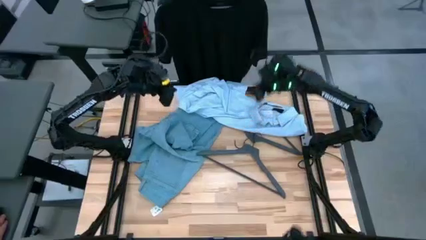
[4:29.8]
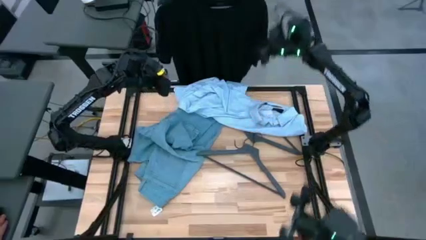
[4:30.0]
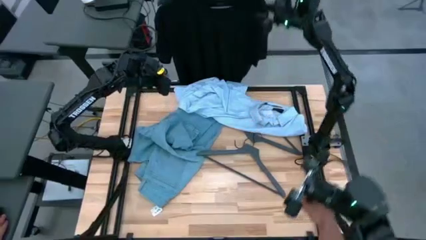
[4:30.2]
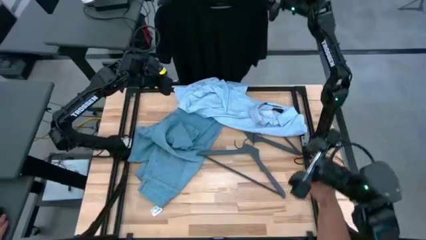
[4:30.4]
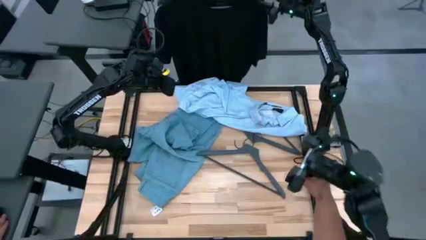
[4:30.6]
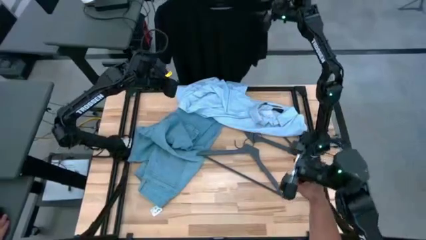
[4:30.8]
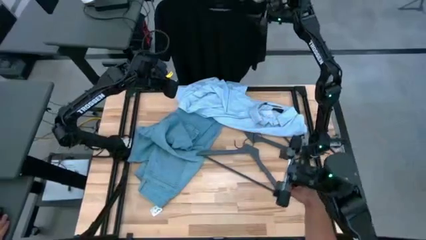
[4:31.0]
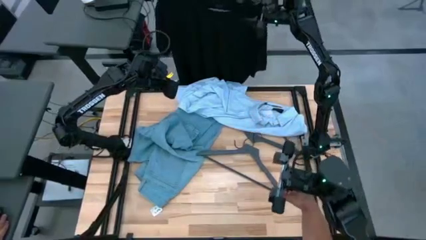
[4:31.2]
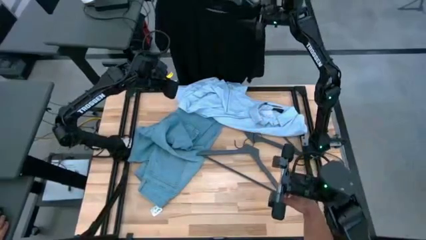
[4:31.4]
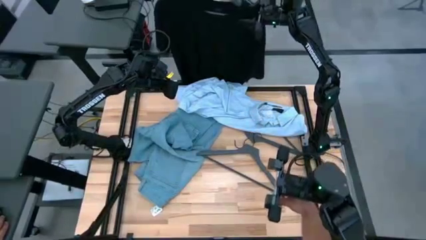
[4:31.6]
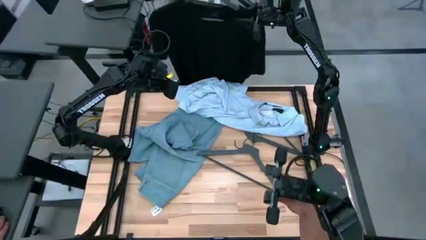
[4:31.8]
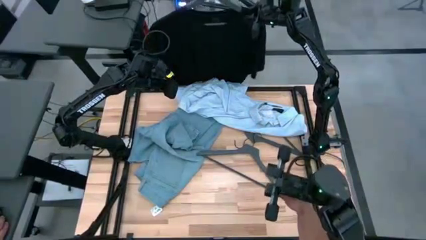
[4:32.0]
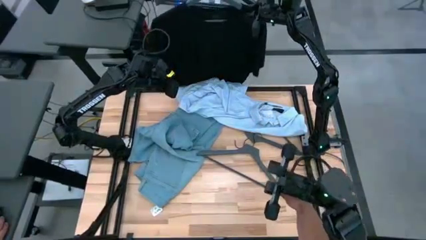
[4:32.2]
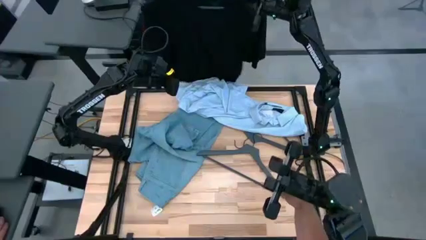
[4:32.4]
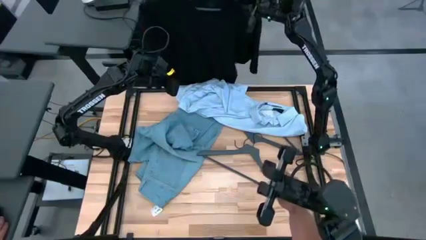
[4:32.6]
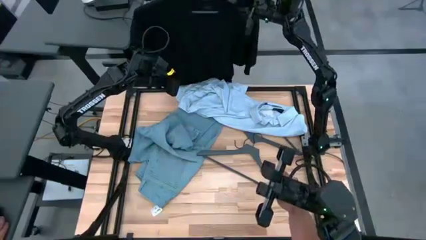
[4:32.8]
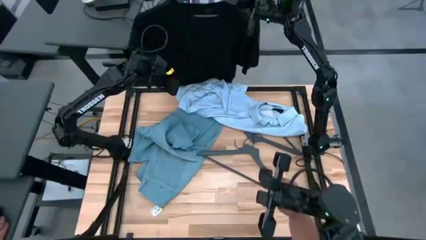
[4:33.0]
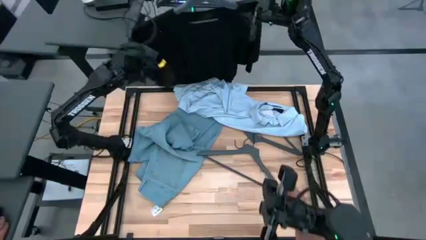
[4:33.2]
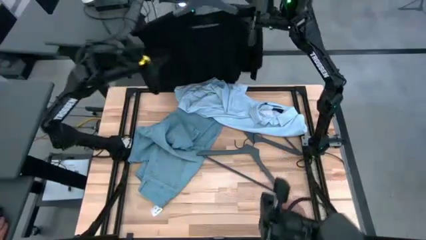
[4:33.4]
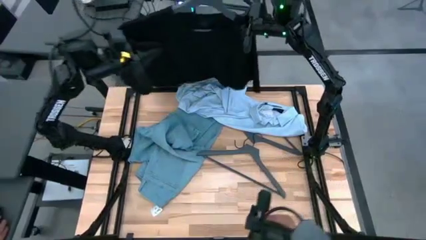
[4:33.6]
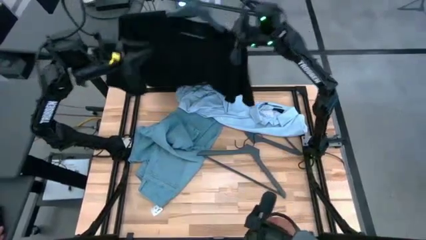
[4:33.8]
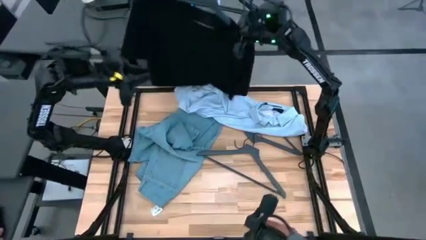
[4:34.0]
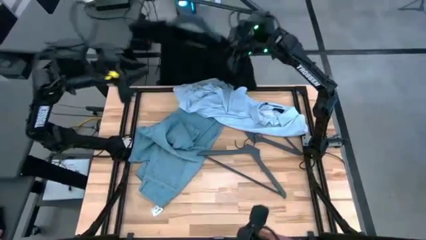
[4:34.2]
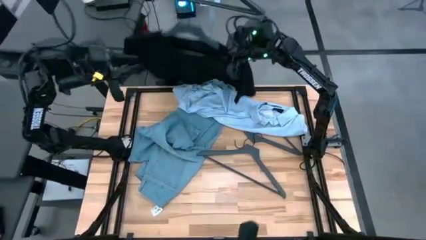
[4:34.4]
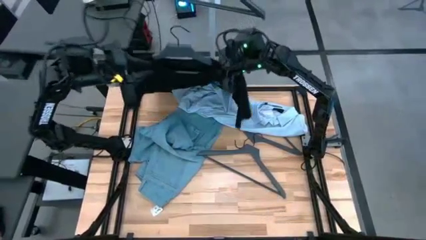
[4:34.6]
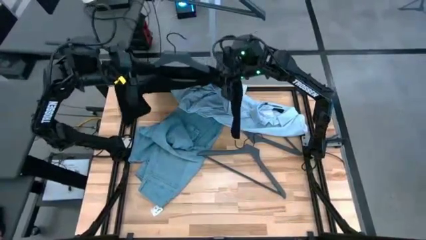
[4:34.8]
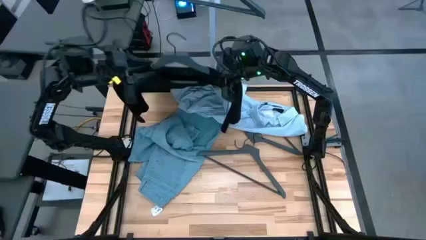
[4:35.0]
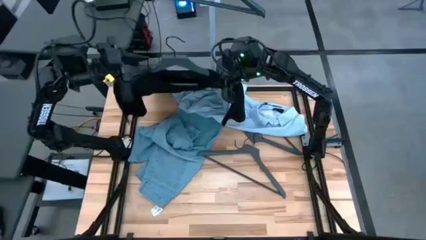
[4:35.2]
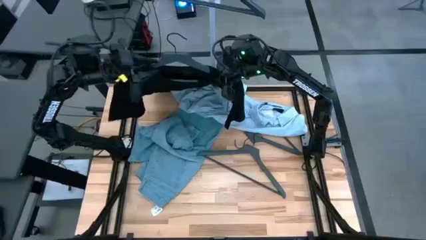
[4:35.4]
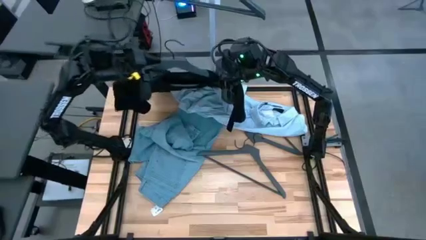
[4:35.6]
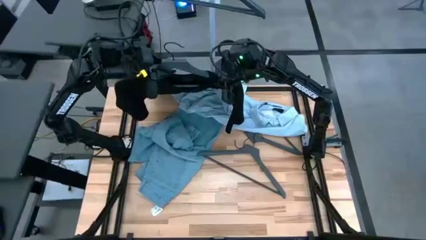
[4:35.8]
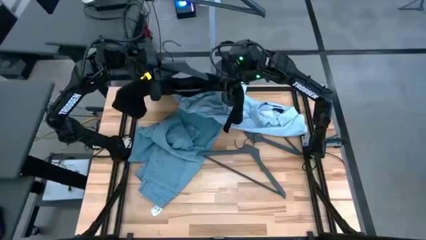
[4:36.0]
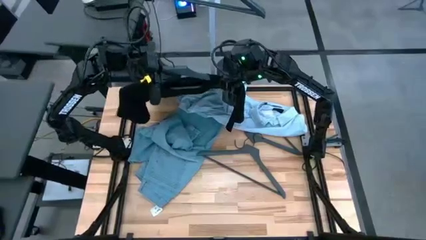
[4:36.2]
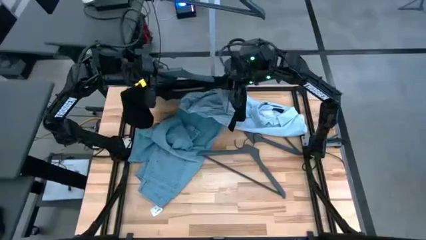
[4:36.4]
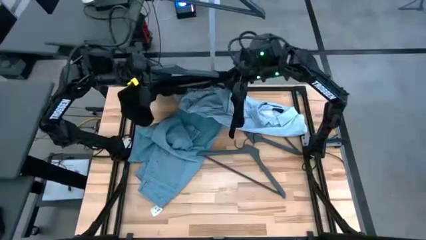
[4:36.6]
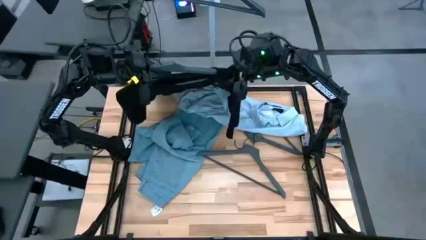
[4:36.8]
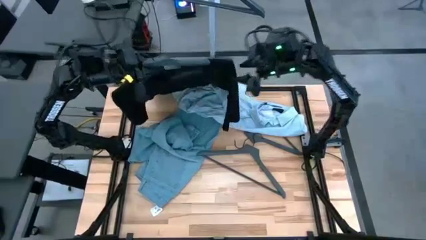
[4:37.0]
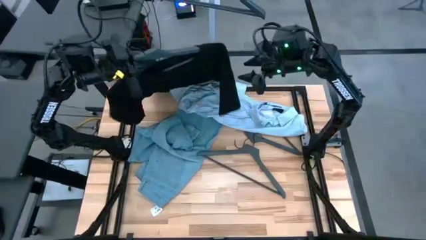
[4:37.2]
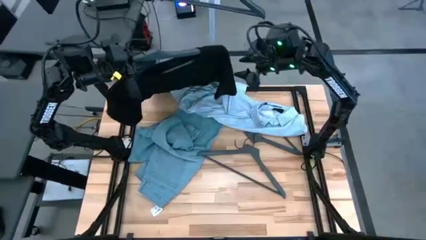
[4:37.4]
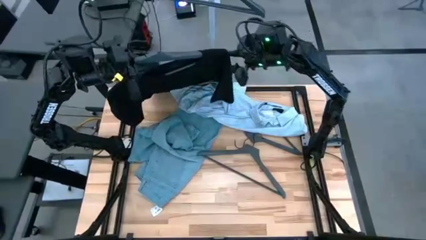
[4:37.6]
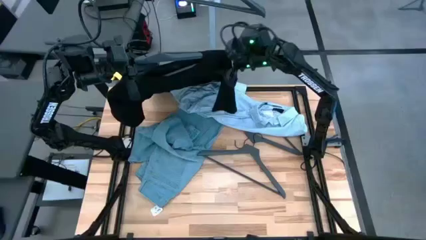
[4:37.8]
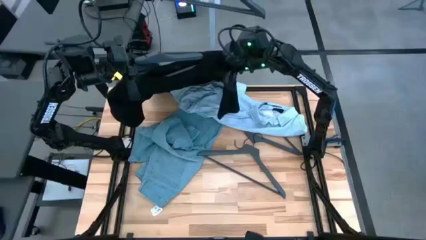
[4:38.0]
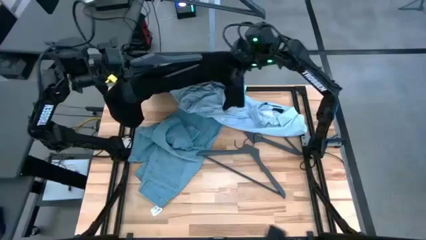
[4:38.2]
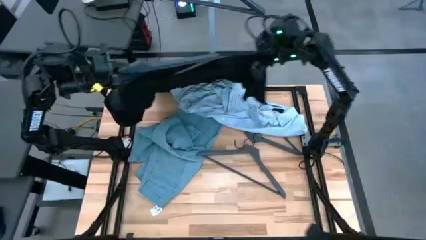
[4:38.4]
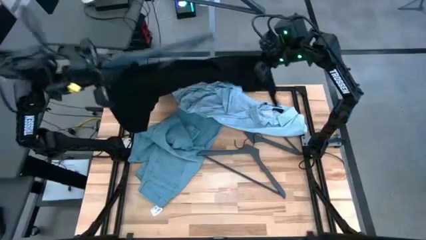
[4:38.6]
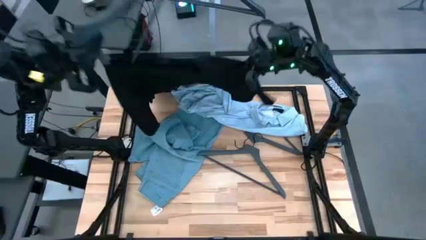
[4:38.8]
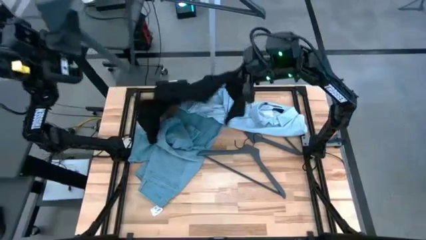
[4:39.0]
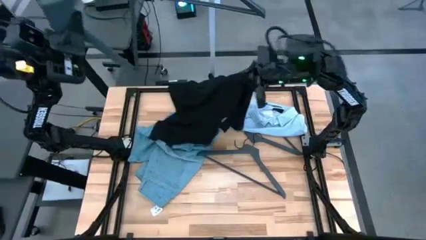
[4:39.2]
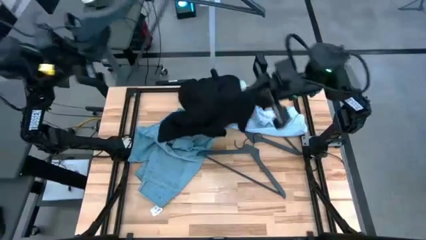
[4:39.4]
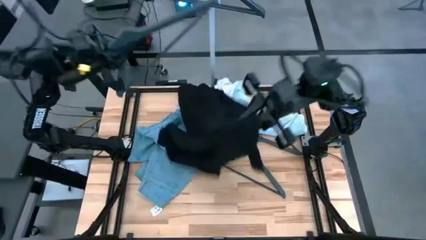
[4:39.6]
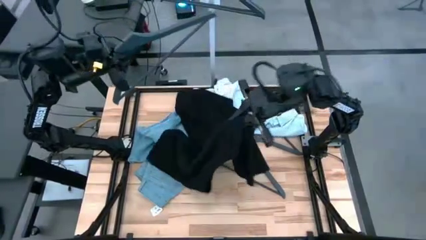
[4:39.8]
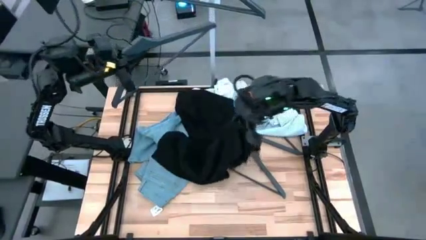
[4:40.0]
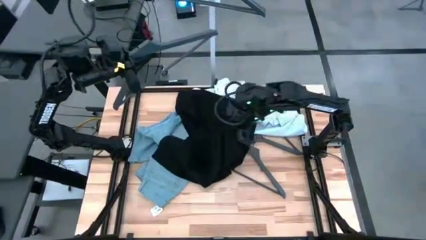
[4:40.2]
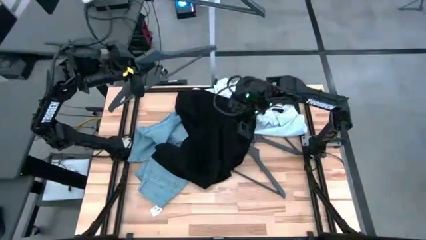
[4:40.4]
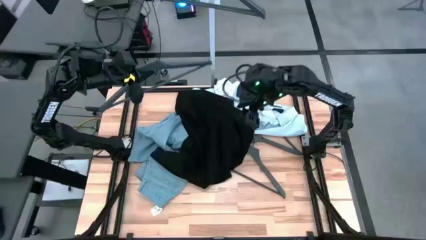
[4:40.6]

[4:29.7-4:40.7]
Task: Hang clothes
Unhang the black shirt from the rack

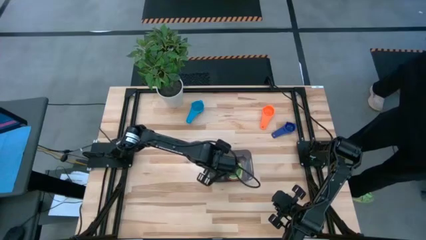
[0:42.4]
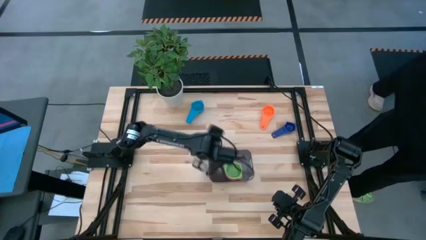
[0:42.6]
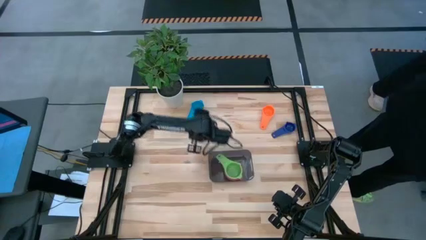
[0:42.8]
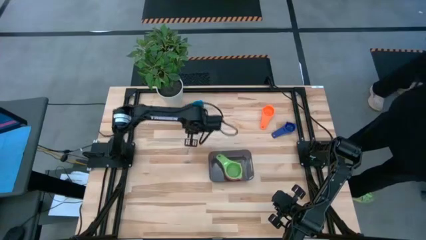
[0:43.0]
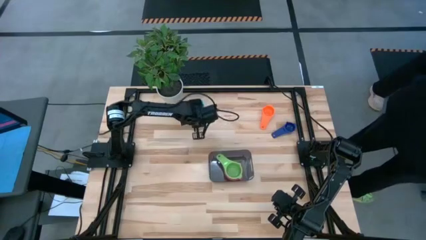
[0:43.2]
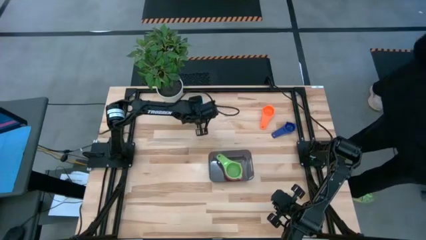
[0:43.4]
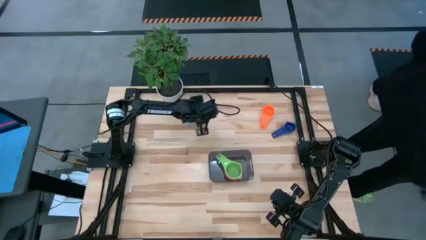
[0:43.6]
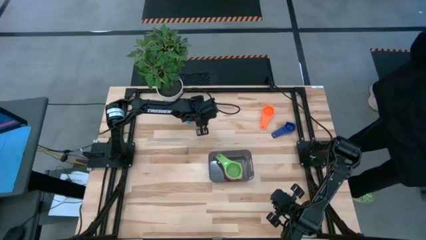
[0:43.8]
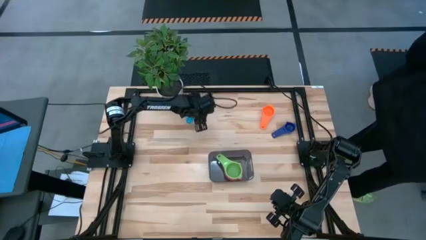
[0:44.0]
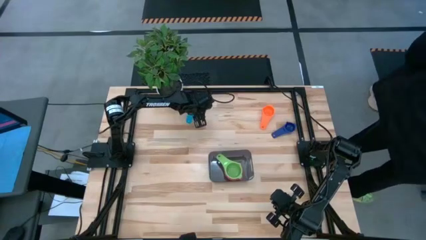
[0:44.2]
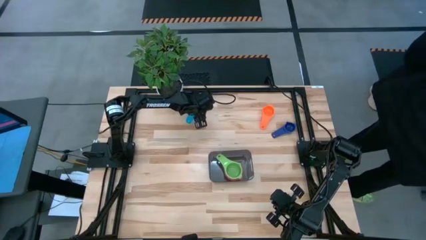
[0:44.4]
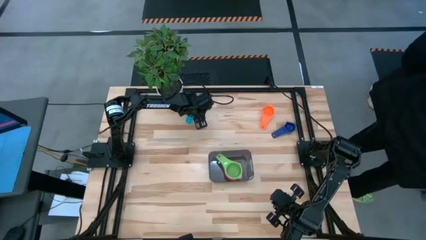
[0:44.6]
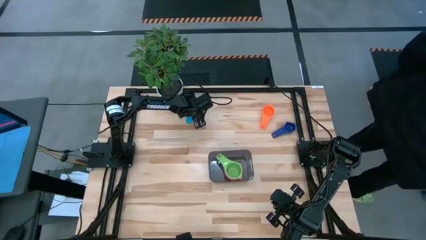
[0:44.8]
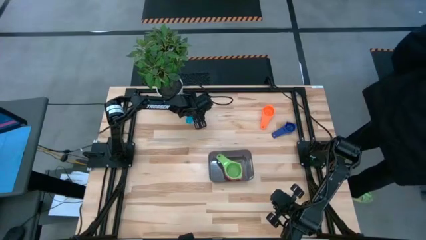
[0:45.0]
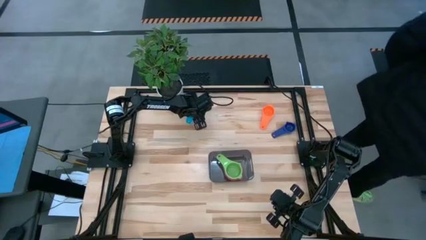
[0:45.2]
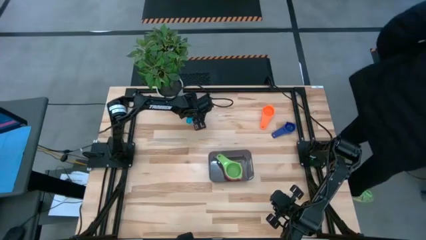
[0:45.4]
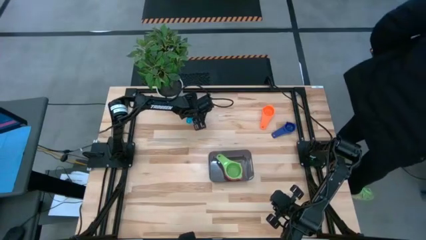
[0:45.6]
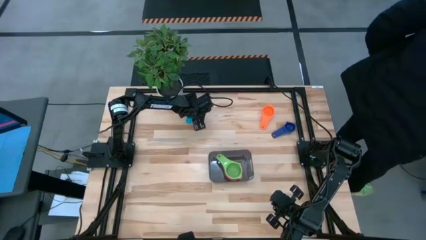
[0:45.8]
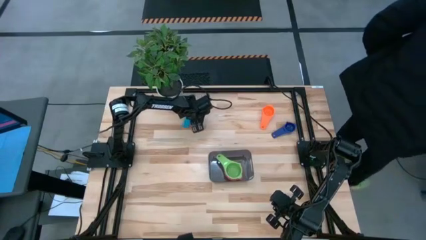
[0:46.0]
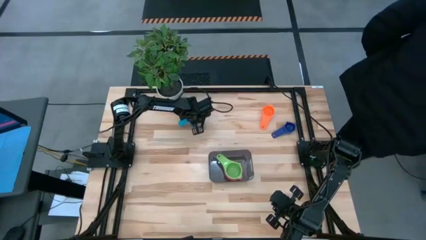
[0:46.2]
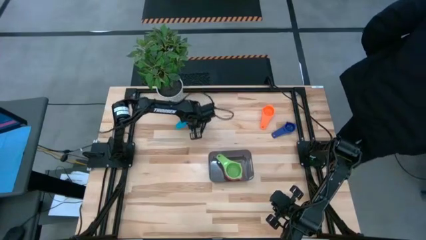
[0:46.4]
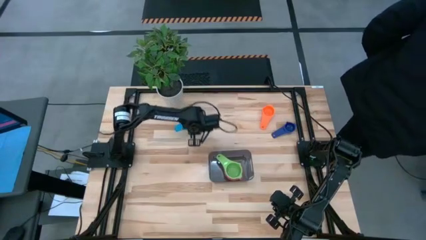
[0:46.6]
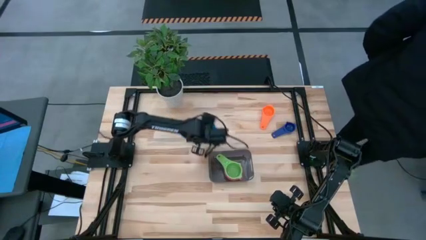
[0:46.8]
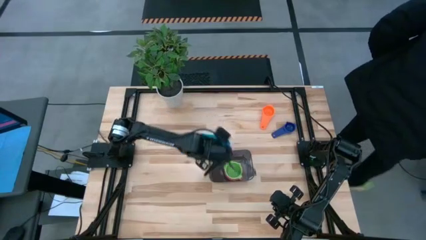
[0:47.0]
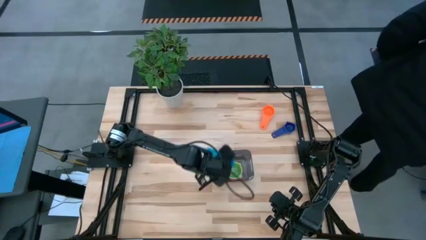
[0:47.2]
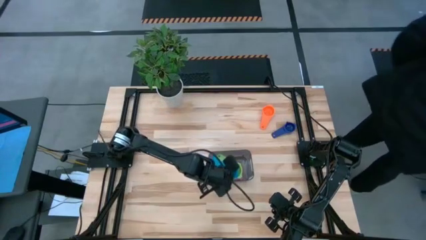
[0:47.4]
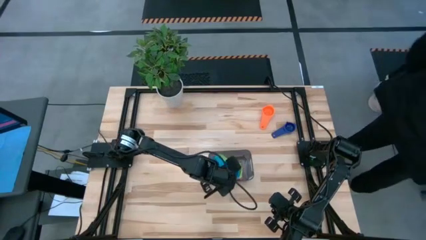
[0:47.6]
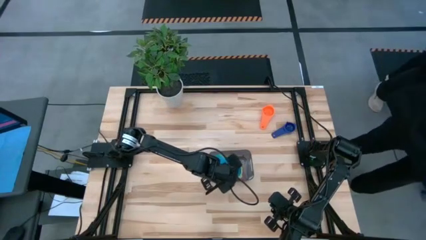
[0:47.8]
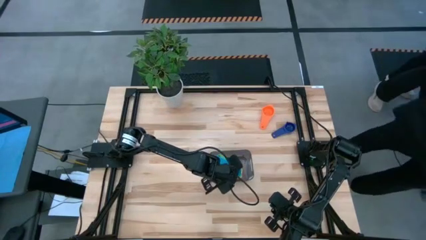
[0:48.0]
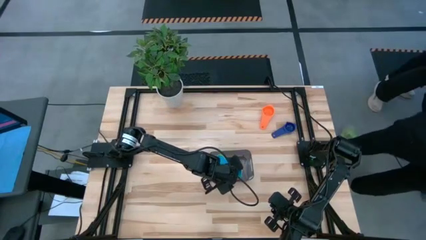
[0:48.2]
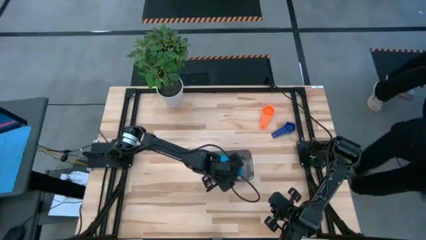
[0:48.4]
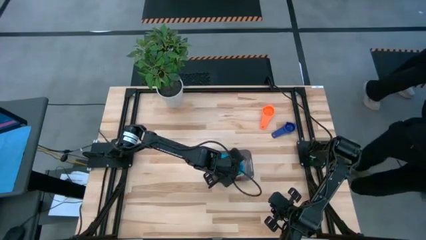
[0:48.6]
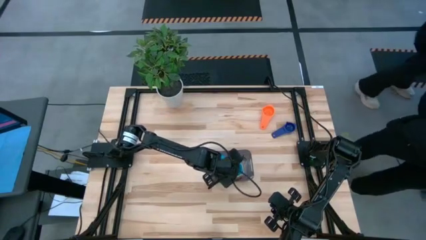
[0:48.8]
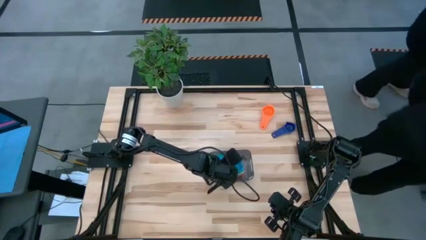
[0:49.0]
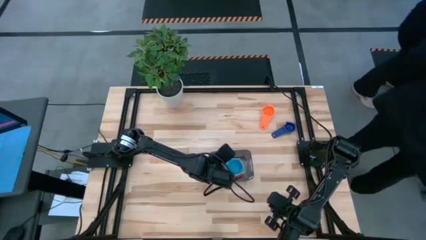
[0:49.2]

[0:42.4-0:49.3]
Task: Nest measuring cups in basket
Stack the light blue measuring cup on top of the green measuring cup into the black bin
